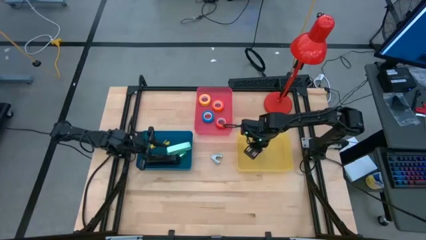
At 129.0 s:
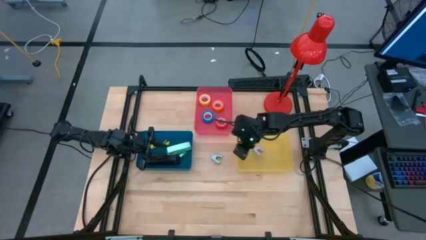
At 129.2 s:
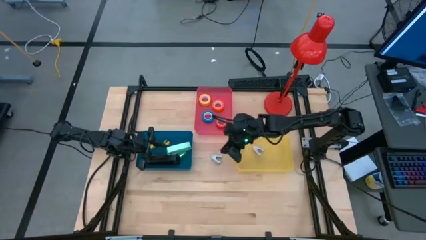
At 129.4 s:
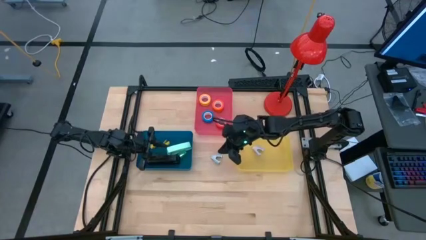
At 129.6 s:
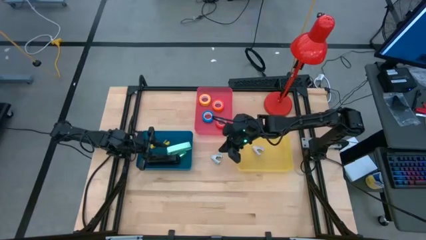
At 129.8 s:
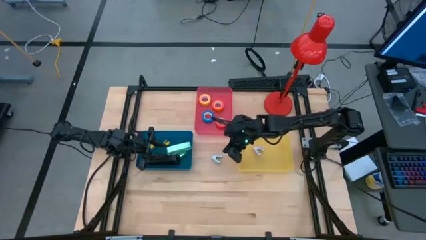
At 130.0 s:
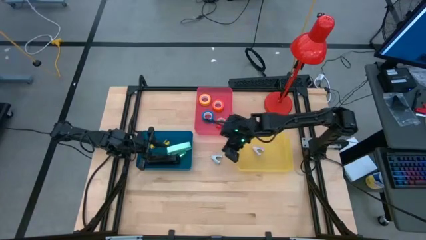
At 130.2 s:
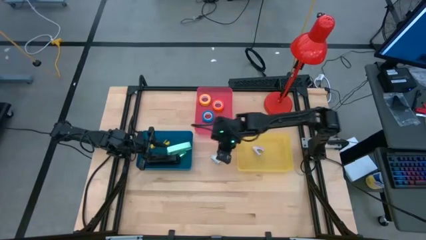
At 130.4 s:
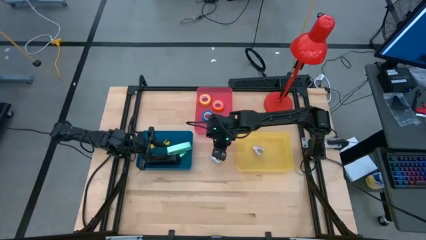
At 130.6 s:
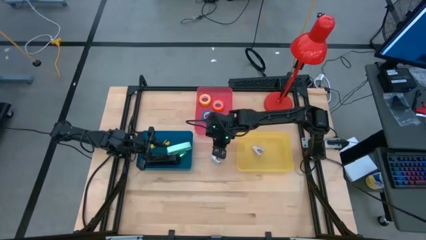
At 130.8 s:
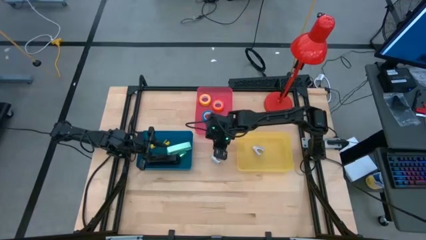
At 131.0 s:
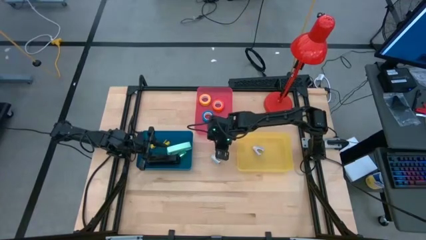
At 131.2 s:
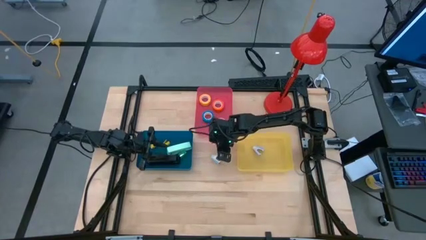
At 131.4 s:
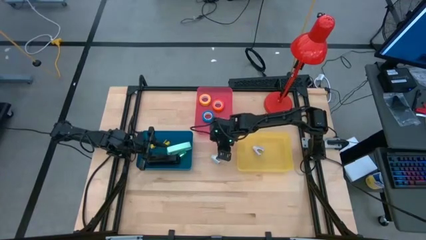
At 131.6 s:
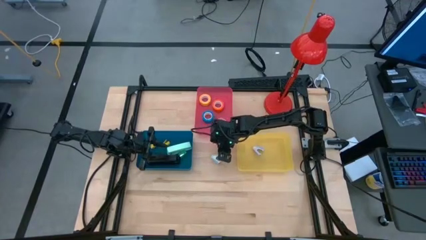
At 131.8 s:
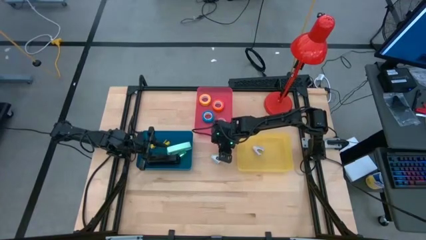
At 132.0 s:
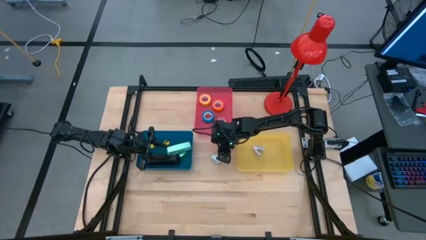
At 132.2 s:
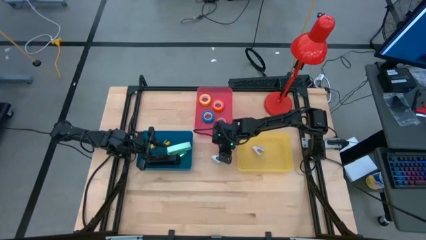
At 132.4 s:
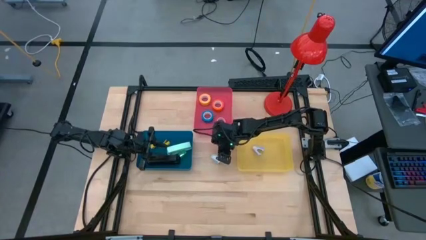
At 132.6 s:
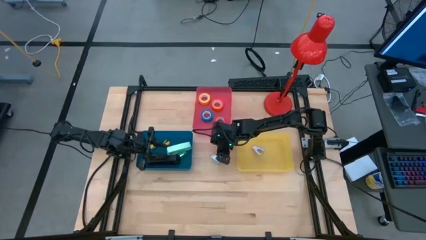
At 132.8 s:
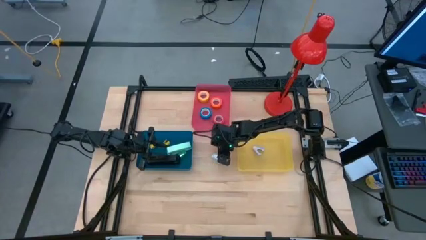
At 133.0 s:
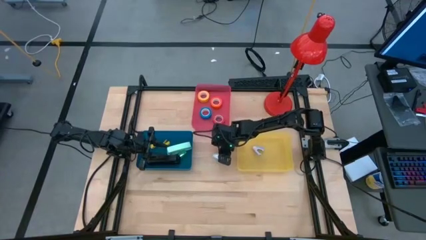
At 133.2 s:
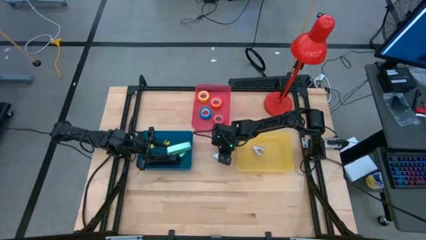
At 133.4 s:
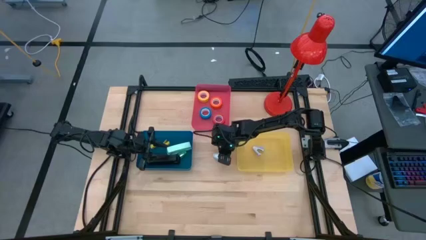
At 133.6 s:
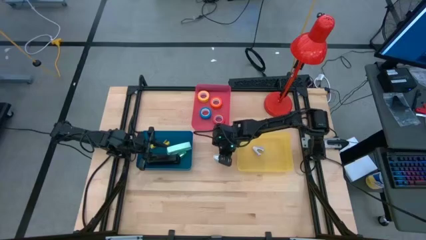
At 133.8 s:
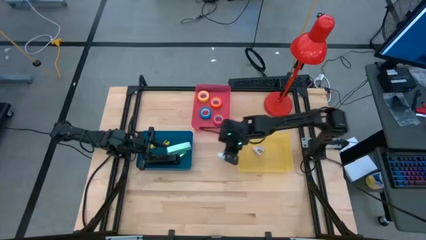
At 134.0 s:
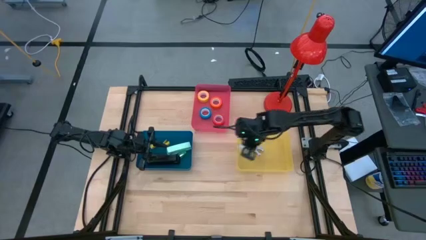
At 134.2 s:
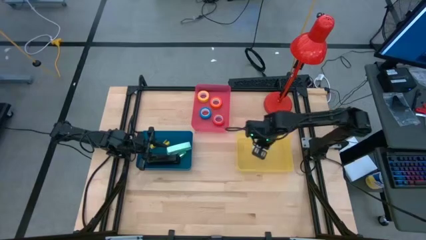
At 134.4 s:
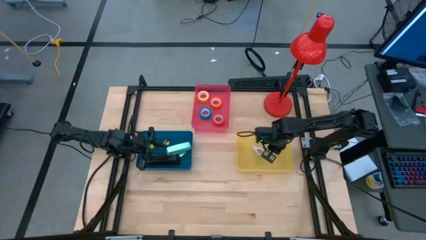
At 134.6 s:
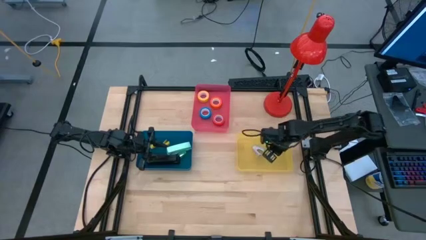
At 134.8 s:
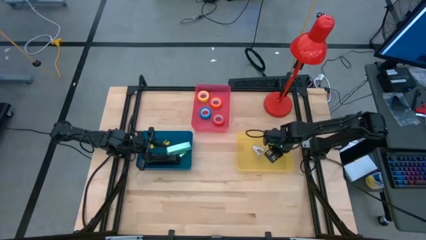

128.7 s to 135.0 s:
Task: Pick and place Stapler, Stapler remover, tape
Put the light blue staple remover into the yellow bin

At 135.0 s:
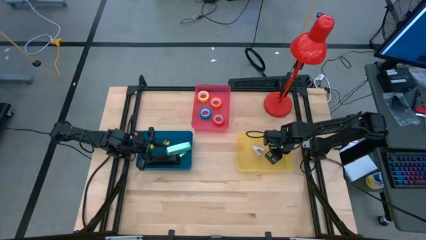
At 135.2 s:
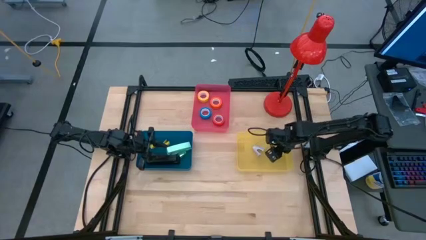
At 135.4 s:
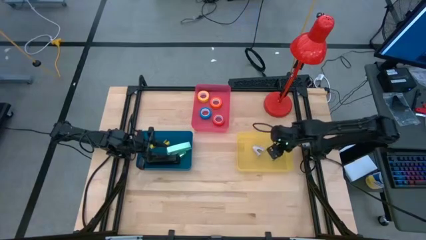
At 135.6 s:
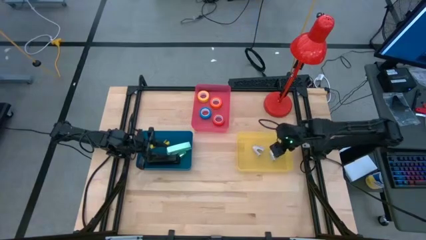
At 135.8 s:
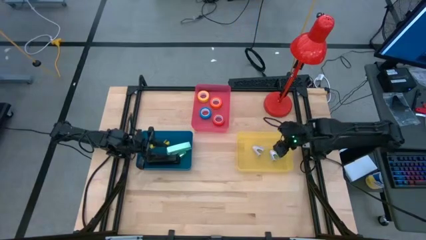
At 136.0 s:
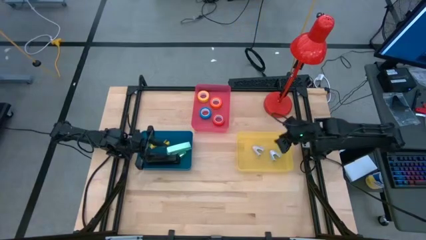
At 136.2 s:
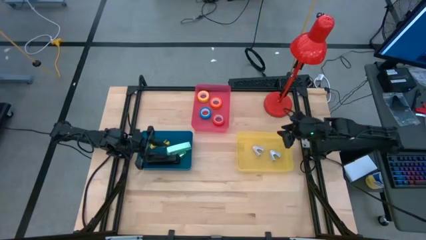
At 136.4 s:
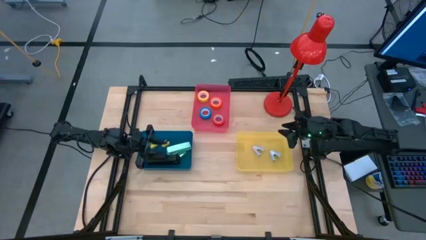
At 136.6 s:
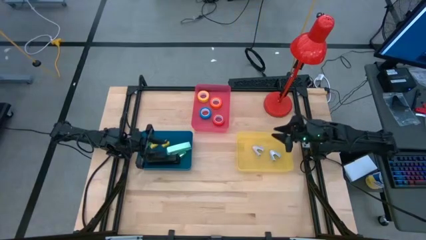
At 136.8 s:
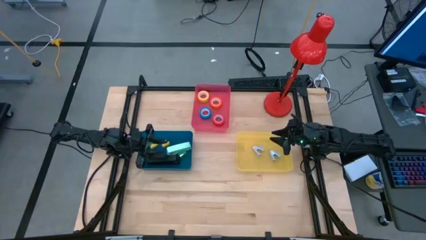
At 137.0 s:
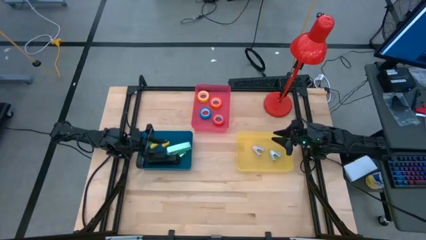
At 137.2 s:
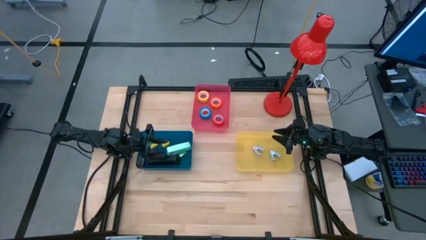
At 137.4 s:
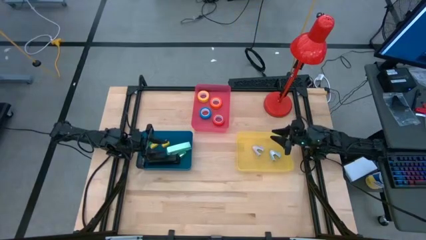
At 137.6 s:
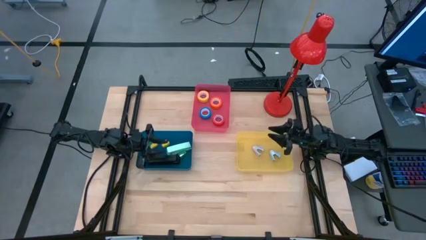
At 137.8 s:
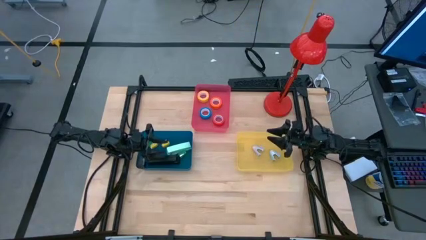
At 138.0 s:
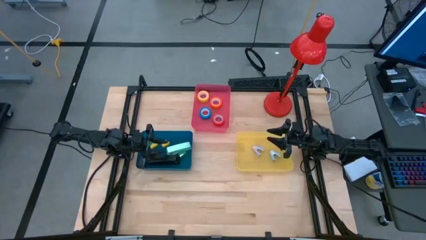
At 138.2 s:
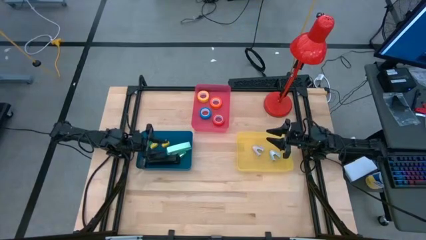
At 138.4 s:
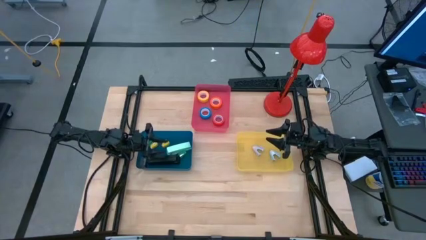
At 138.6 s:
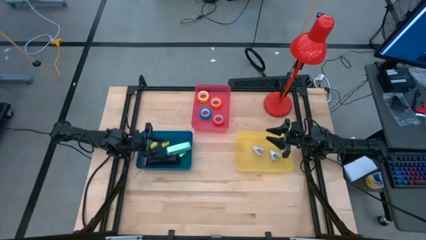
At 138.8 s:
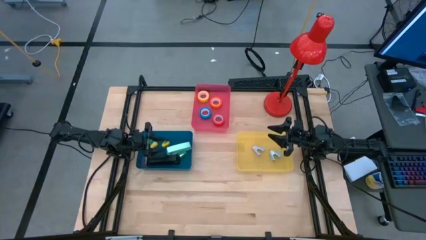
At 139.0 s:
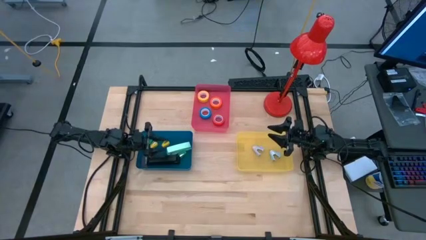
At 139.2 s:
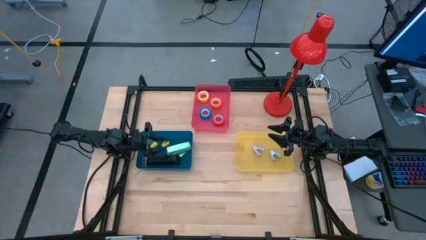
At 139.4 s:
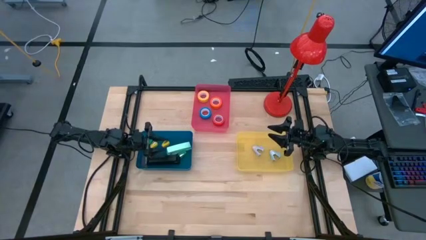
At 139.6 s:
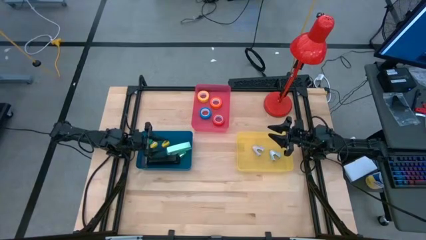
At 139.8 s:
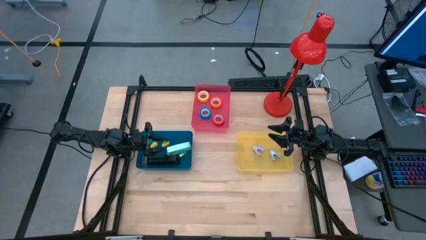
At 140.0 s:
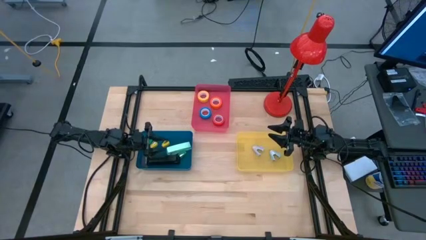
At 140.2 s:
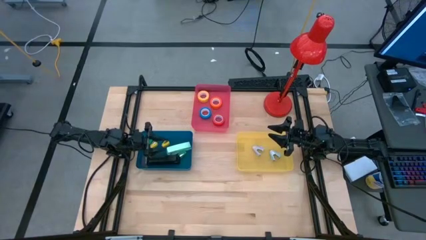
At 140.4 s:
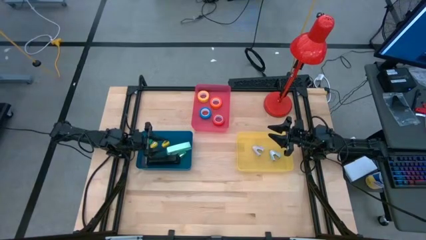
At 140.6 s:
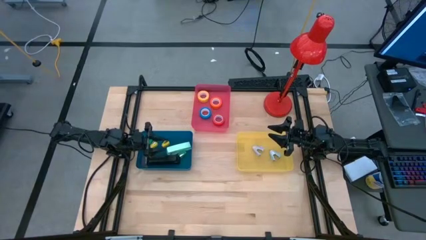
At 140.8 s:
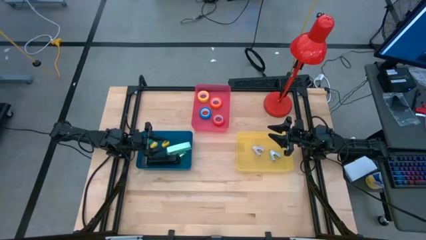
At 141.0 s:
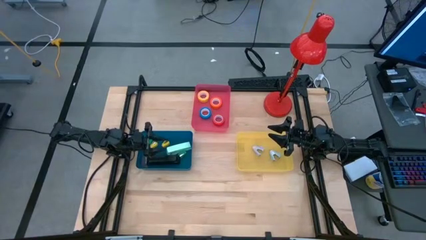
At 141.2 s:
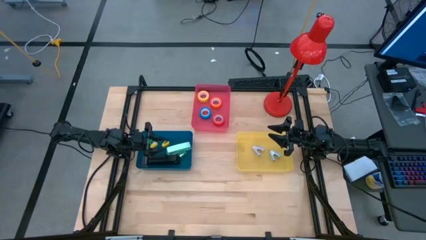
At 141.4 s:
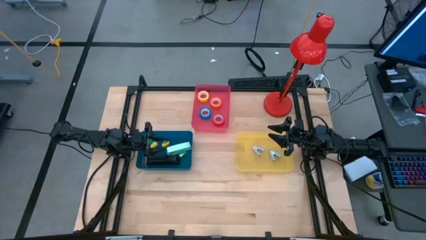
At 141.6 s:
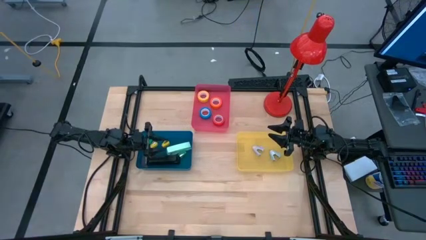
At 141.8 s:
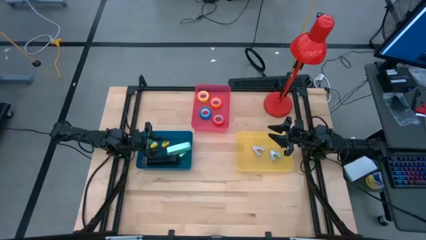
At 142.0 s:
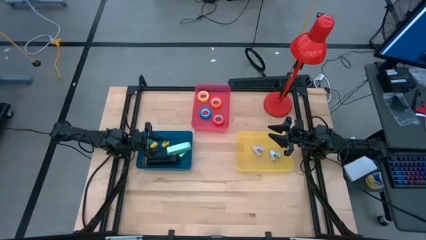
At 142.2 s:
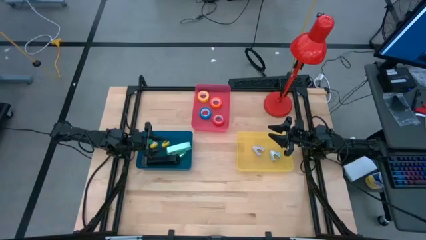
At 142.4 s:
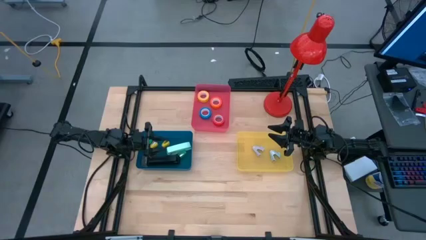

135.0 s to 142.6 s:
Return to Home Position
